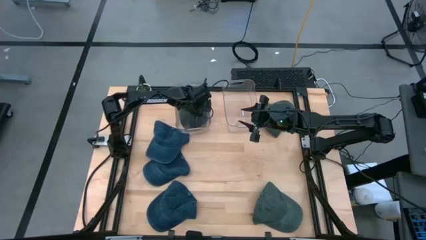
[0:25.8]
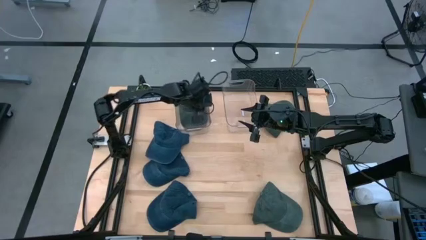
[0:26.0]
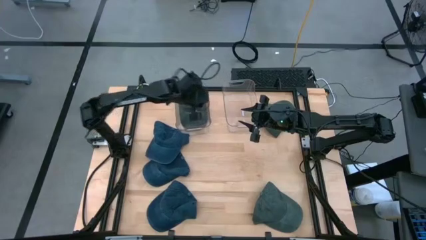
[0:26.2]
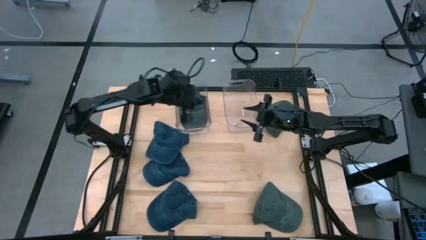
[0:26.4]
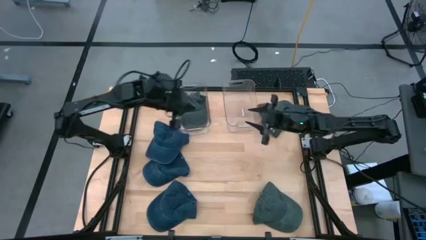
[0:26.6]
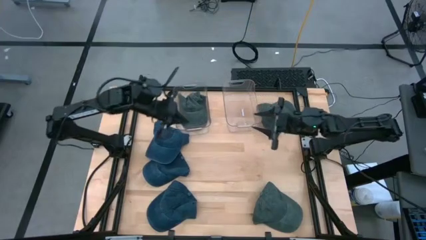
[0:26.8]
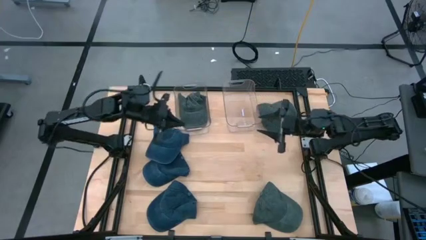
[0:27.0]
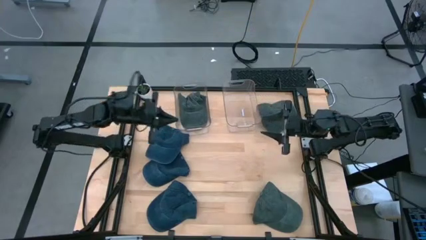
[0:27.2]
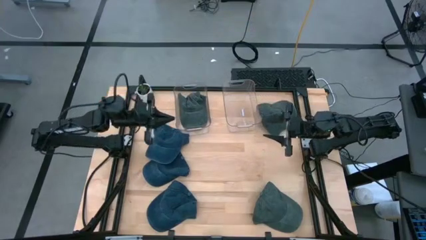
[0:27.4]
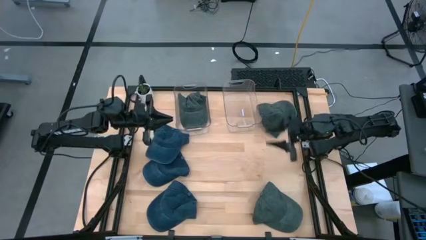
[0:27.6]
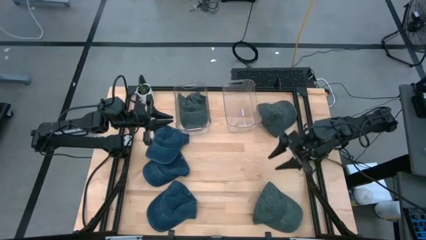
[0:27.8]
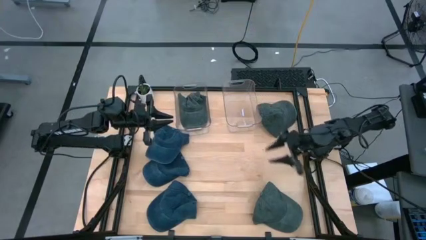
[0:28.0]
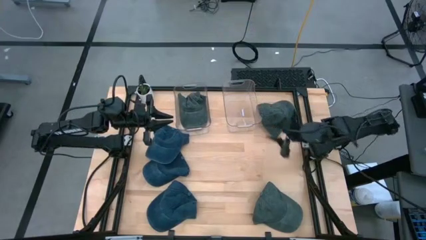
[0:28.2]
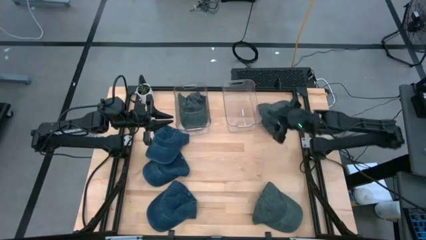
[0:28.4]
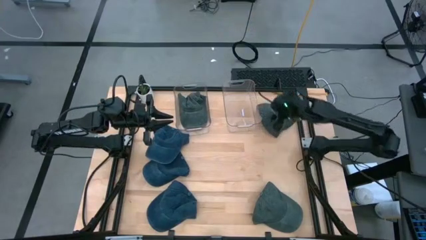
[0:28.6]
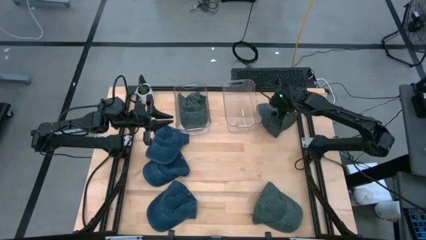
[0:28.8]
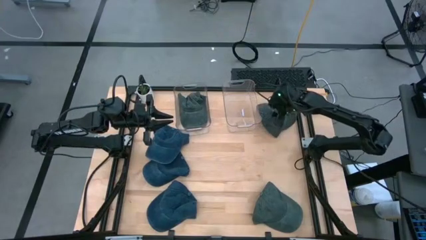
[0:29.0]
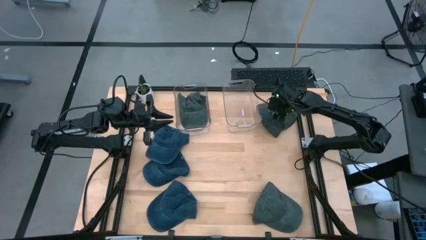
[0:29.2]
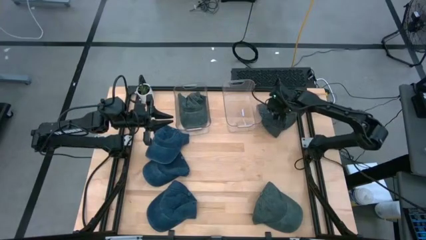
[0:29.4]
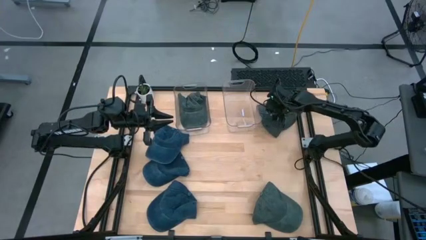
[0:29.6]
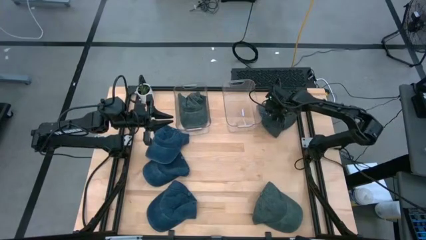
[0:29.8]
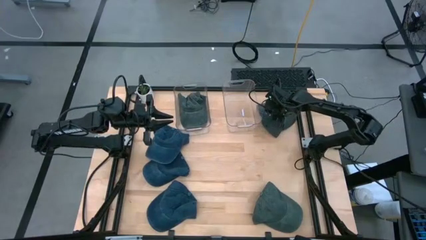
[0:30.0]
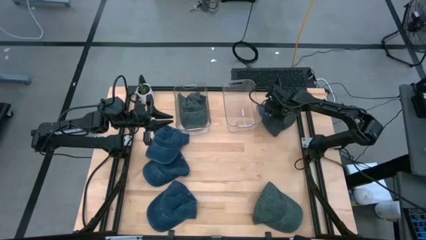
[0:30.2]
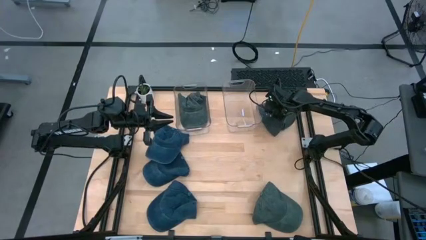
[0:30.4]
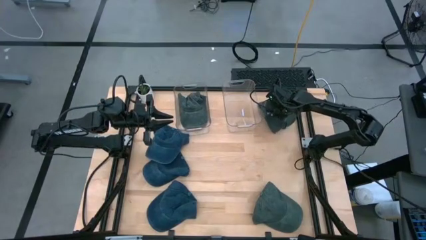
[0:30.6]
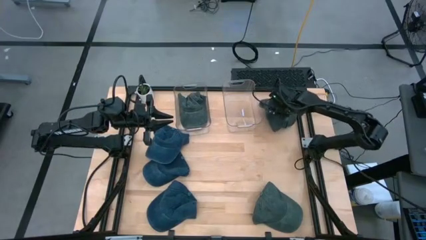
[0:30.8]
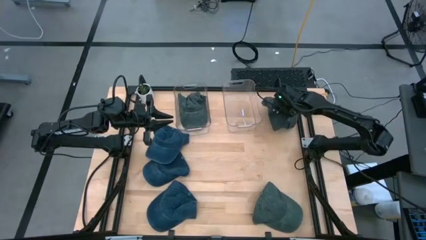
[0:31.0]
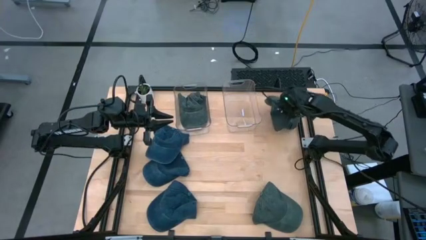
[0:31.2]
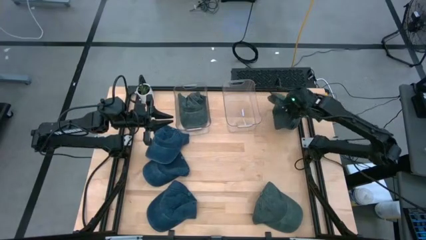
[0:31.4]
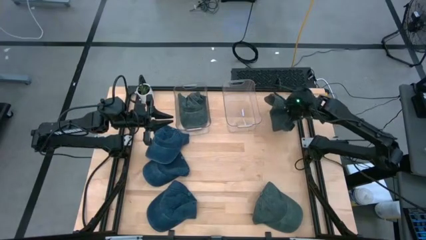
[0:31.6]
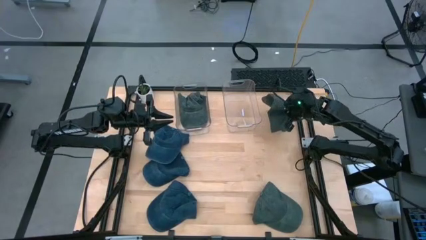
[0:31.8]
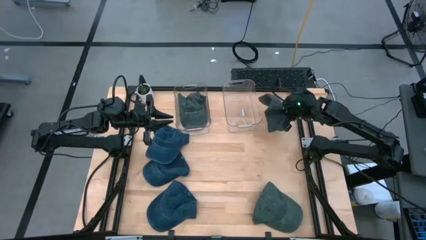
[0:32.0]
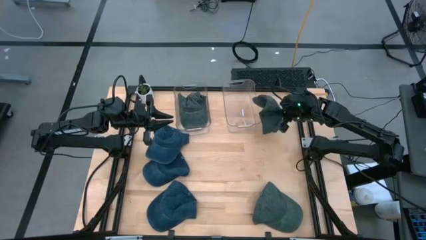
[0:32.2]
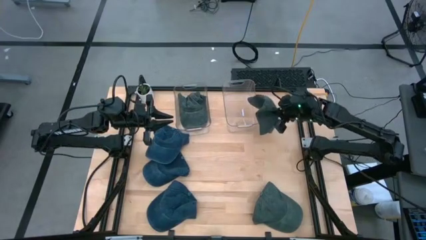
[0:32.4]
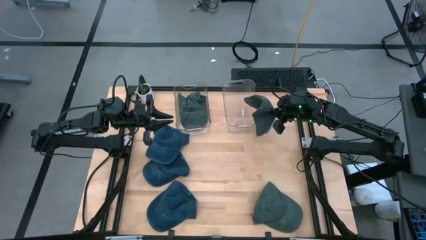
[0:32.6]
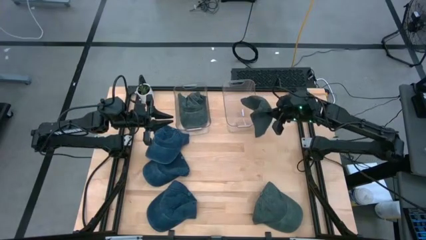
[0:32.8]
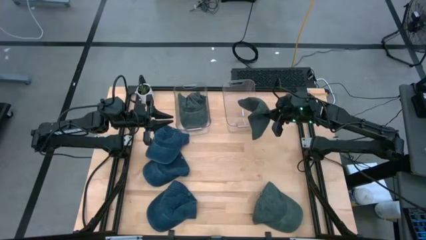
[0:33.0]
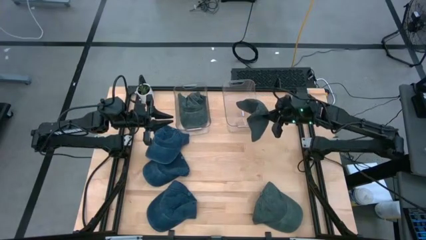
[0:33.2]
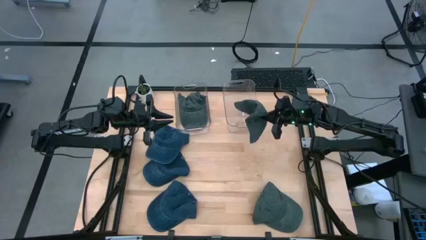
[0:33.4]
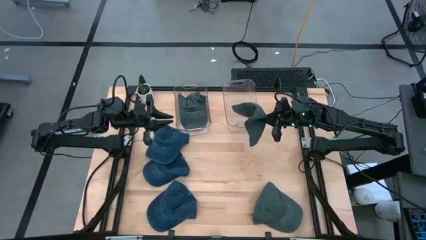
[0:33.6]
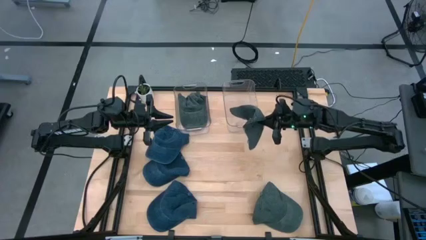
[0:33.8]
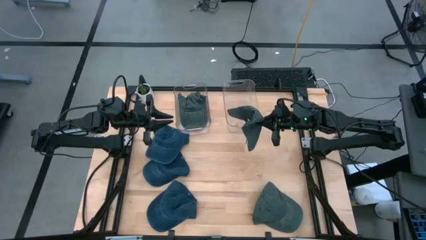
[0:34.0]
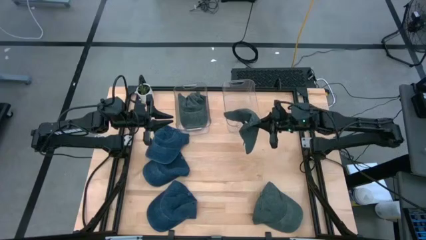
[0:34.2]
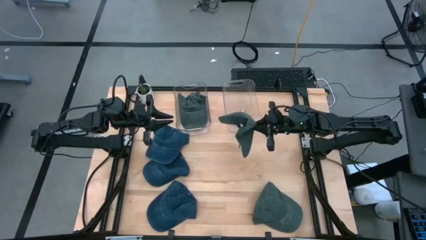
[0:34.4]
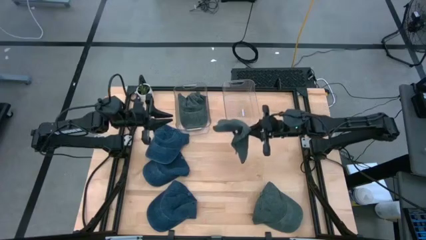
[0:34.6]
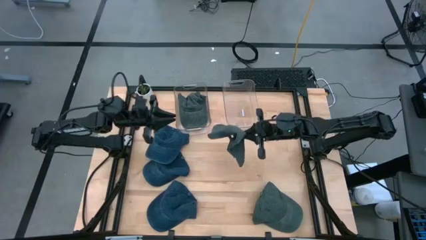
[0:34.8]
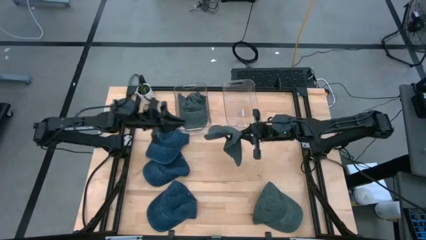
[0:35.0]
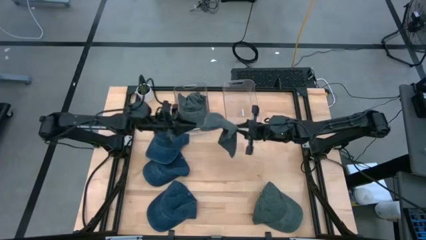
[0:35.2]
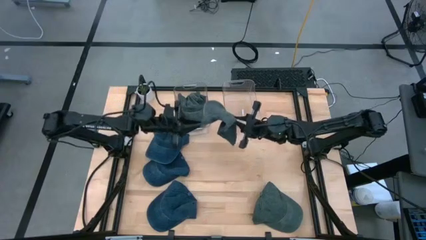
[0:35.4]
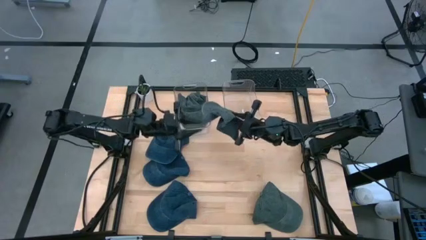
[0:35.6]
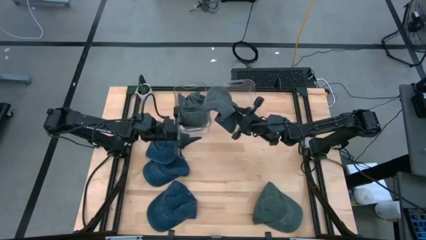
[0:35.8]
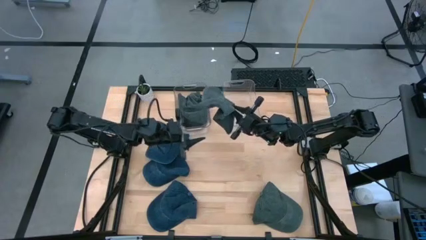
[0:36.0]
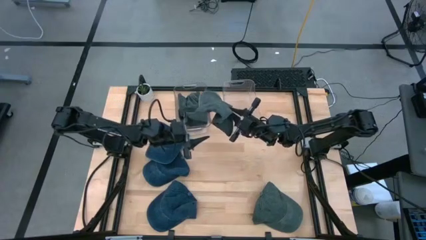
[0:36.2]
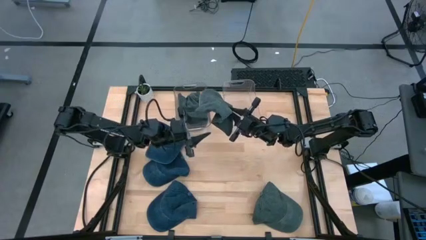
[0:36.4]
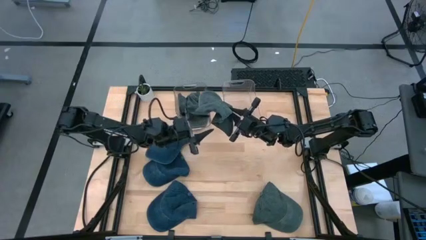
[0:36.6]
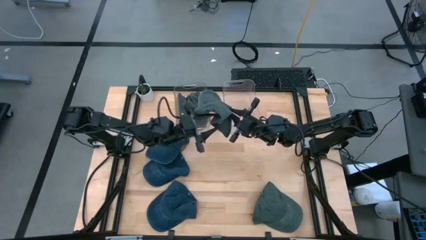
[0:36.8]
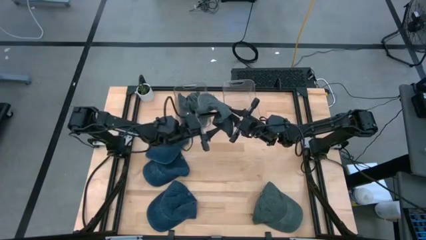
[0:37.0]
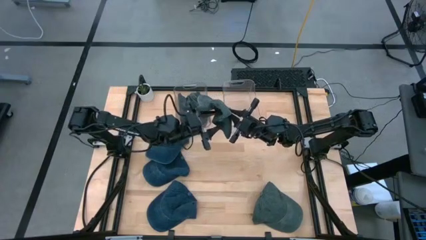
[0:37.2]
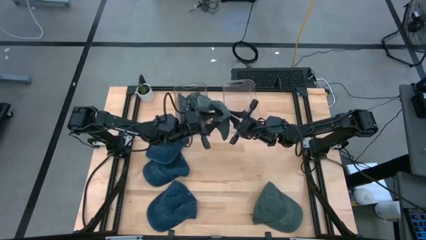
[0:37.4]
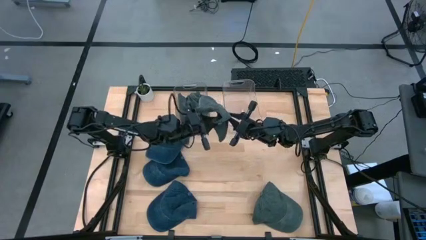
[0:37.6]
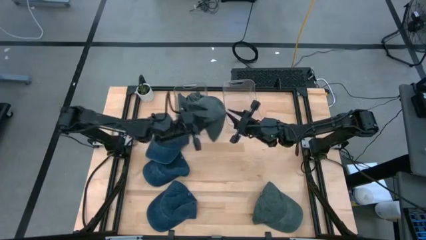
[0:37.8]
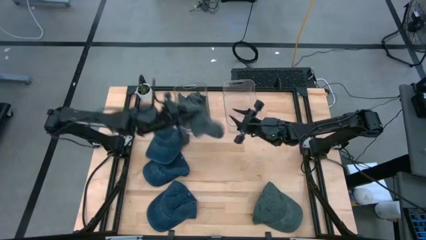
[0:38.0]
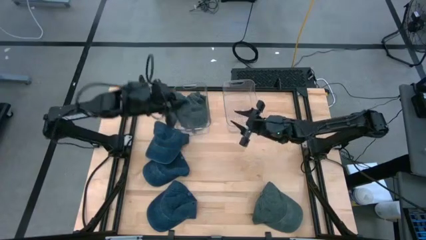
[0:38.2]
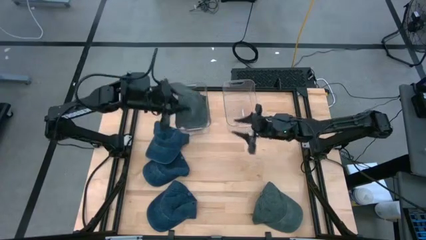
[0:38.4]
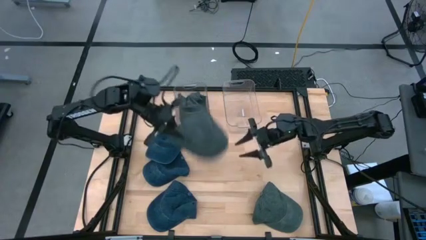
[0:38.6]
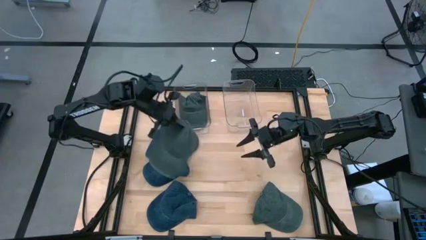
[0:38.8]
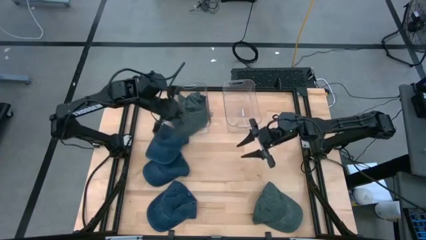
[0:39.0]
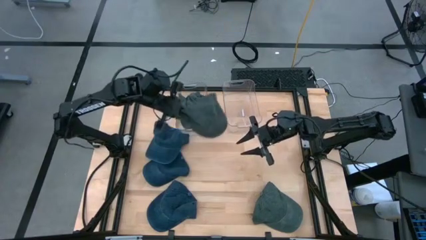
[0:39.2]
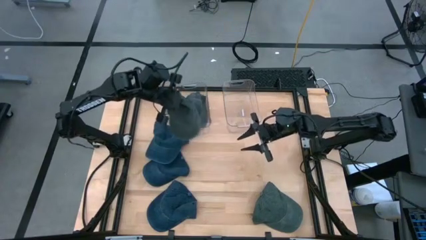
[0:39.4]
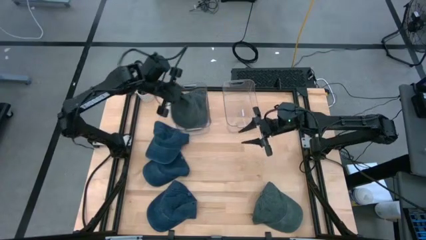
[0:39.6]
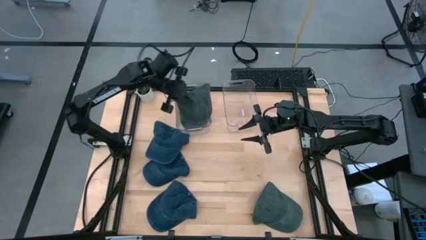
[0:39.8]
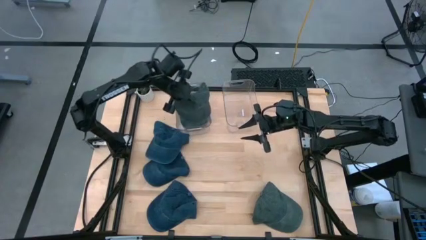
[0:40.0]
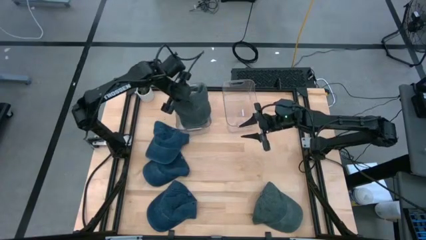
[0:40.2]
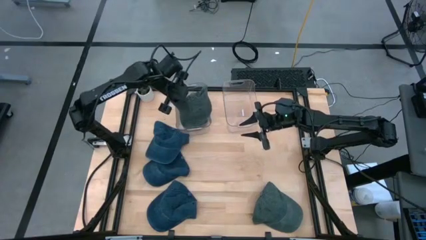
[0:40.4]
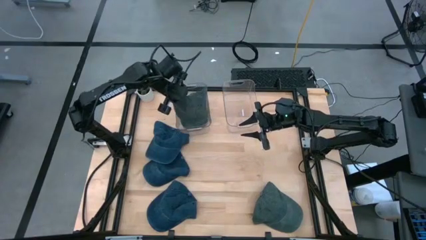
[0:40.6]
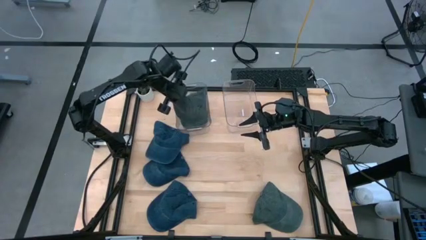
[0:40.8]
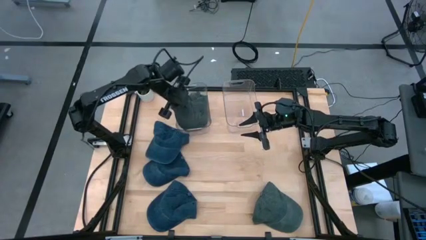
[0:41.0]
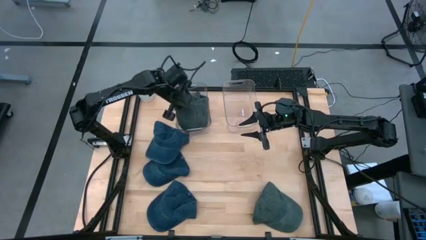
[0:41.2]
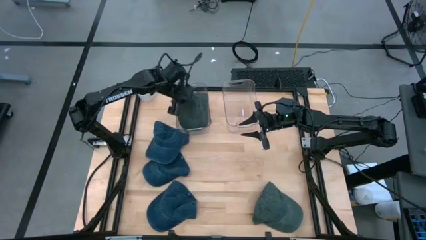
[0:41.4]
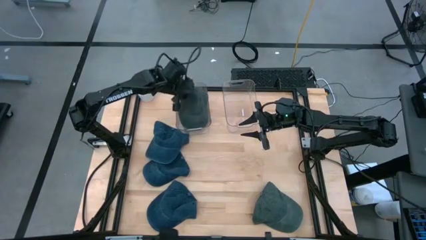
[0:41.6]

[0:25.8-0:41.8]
Task: Pick & Place hat
Put the top gray cap into the left transparent bin
